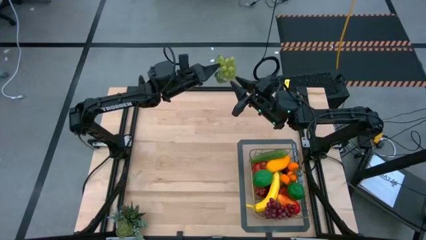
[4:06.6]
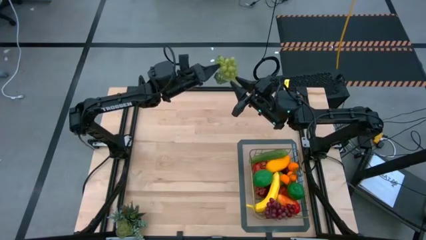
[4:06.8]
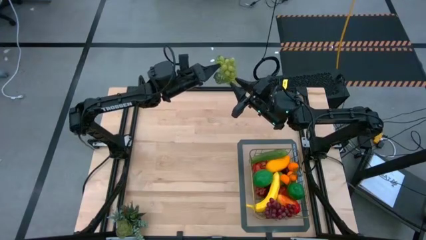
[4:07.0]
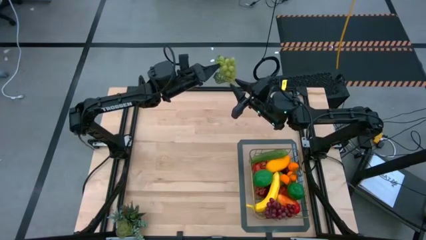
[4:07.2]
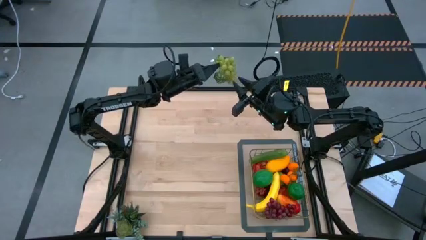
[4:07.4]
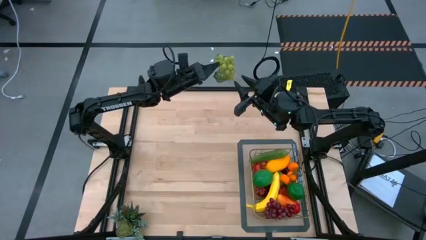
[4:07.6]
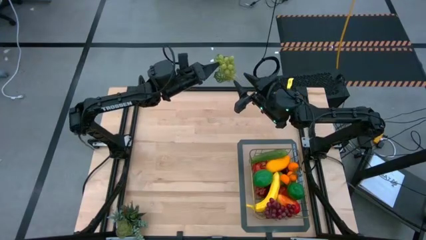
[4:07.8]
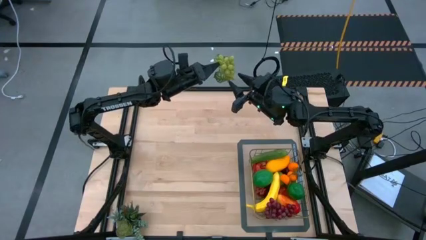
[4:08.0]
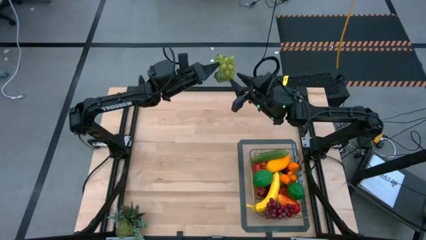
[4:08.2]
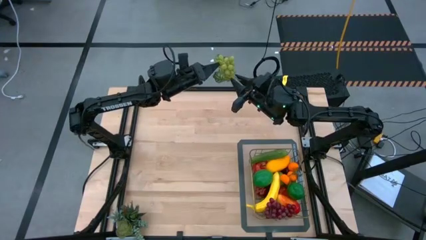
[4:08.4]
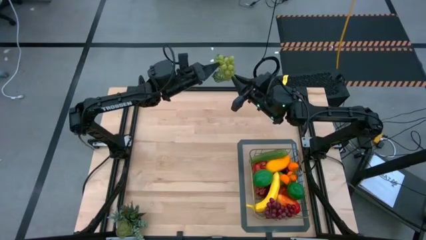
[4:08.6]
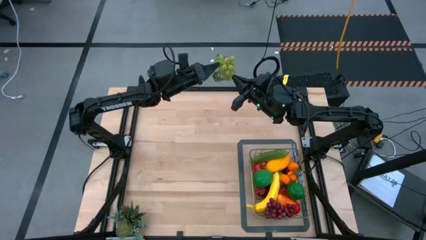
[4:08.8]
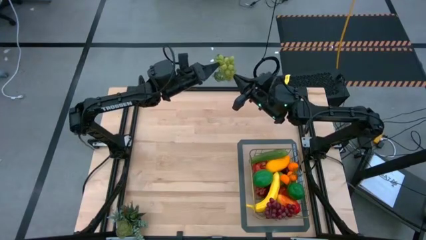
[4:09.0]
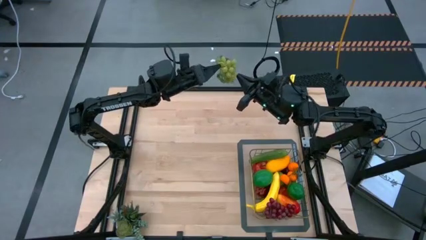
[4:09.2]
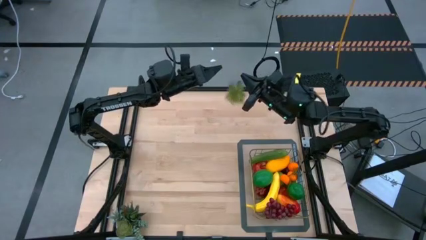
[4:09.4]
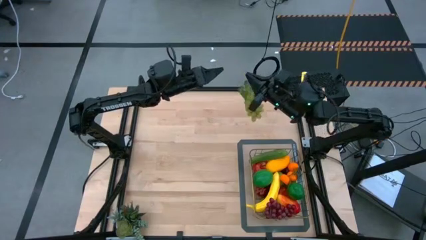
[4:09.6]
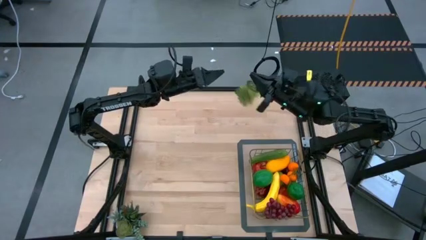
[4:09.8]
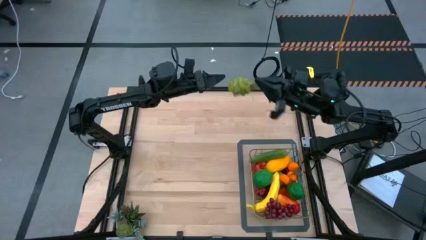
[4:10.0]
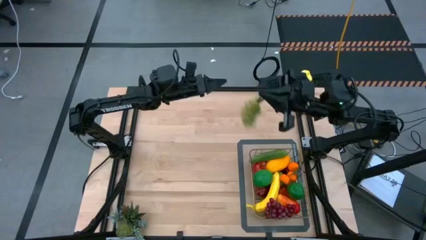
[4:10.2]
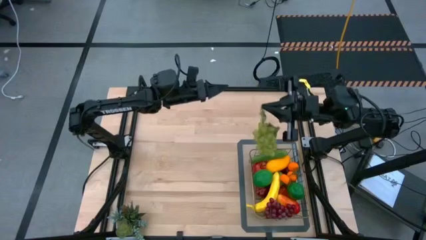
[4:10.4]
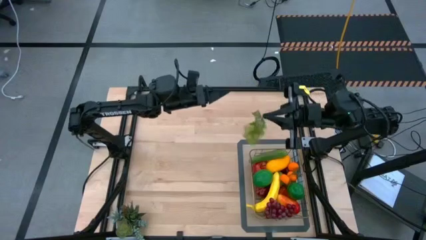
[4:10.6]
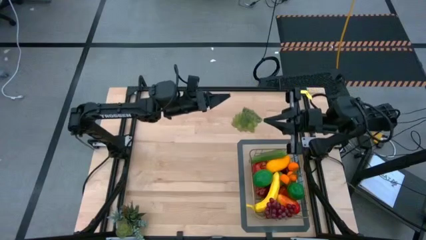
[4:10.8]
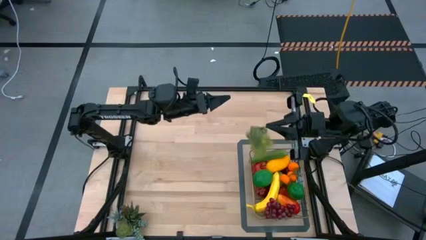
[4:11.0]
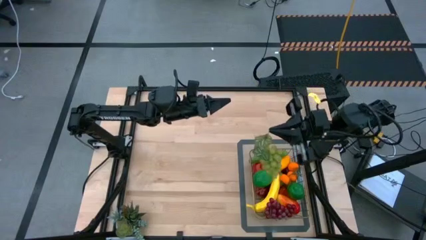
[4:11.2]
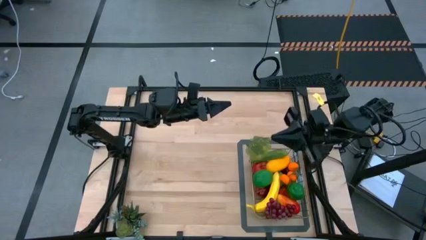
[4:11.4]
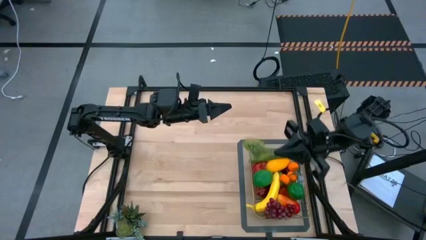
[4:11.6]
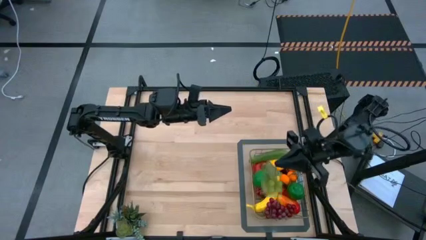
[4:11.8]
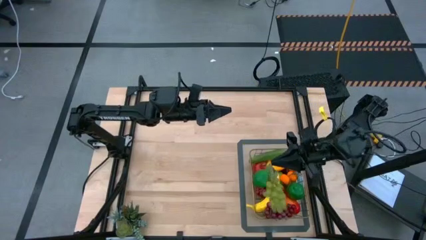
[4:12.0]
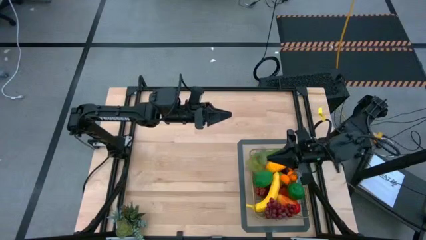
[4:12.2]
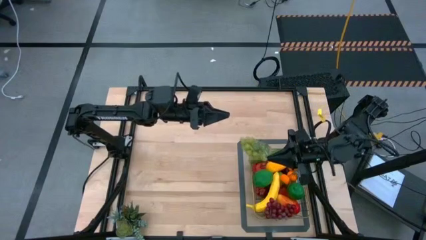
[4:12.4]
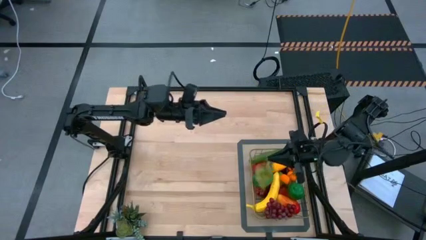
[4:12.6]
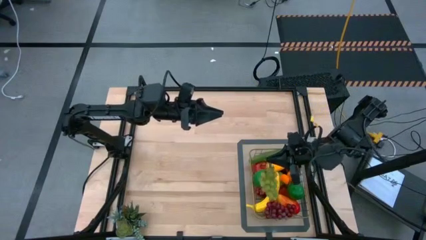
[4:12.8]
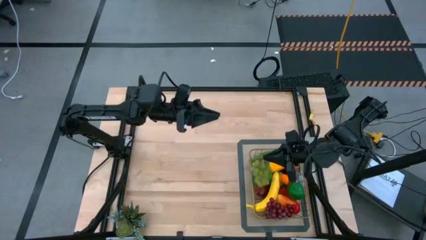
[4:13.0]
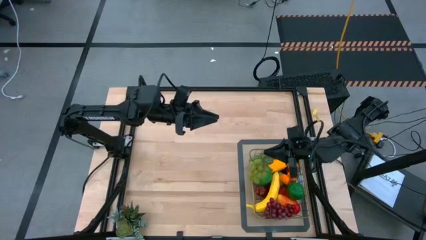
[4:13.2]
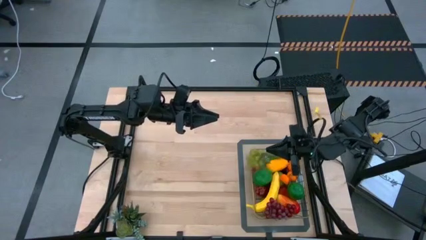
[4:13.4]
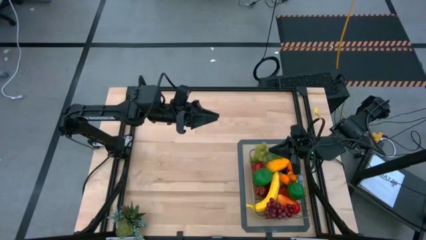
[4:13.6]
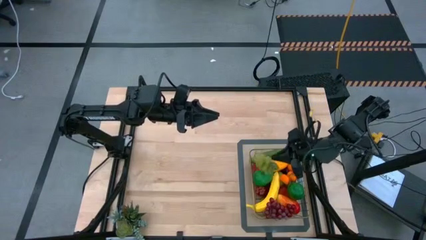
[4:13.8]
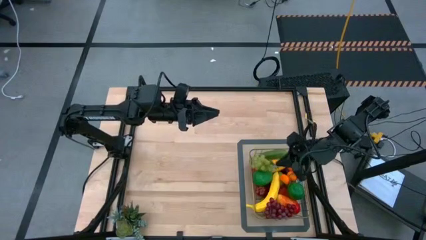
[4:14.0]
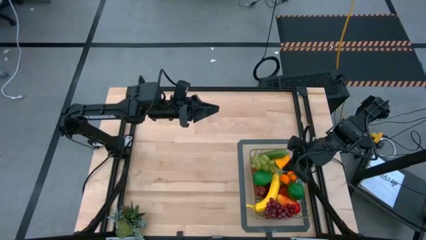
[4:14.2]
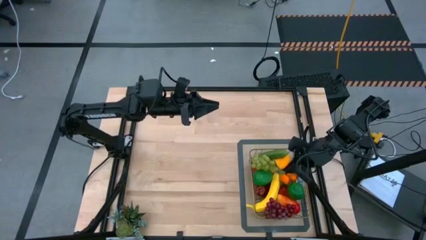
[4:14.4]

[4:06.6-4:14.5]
Task: Build produce basket
Put the green grapes into the wire basket

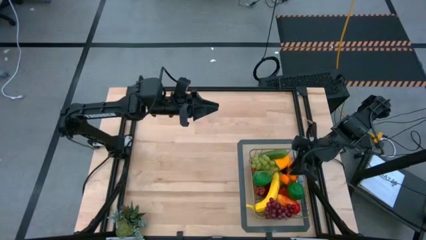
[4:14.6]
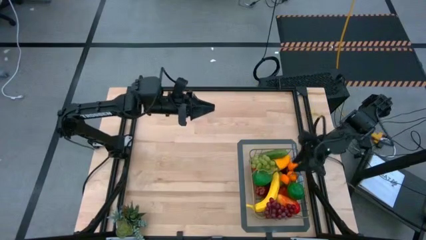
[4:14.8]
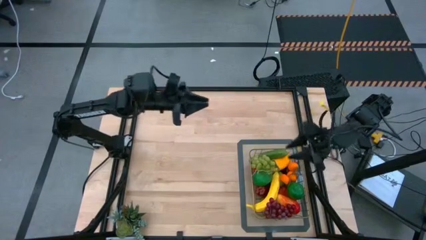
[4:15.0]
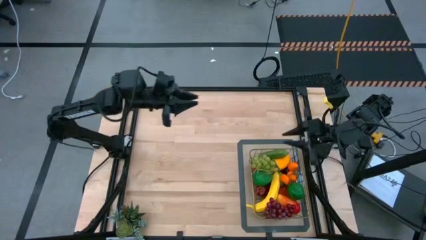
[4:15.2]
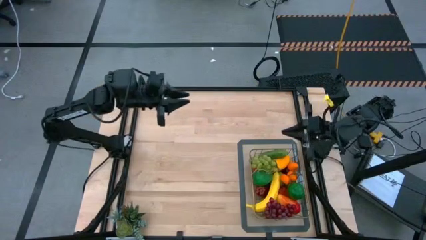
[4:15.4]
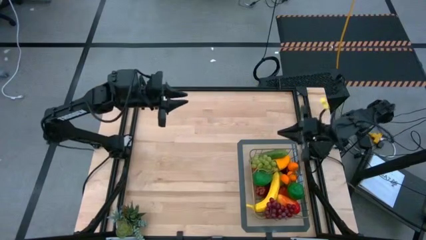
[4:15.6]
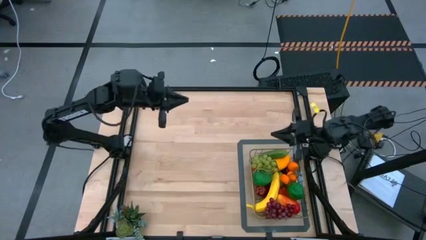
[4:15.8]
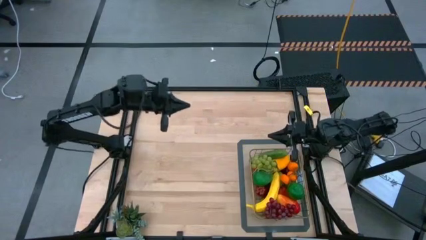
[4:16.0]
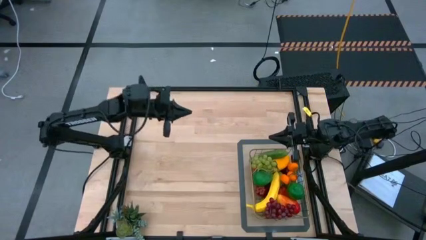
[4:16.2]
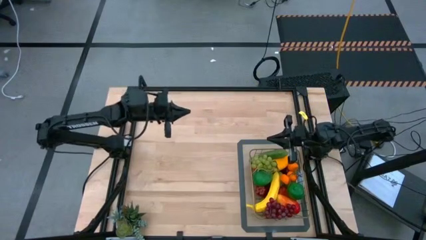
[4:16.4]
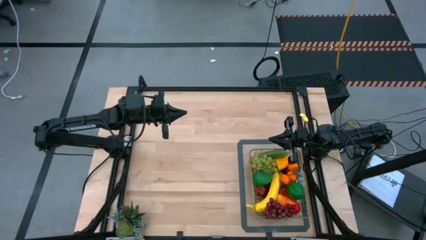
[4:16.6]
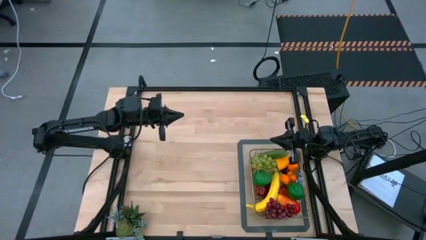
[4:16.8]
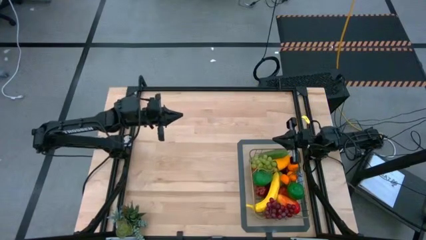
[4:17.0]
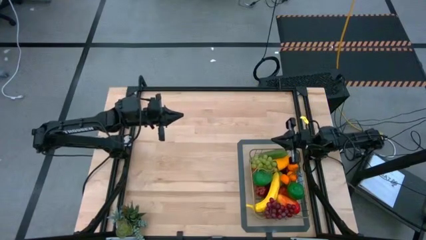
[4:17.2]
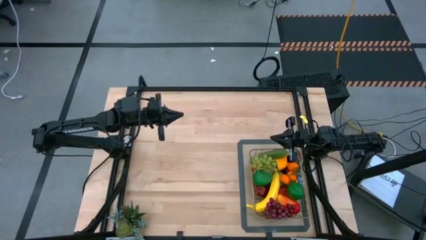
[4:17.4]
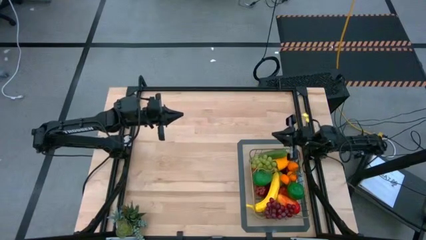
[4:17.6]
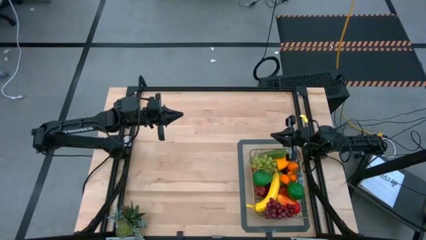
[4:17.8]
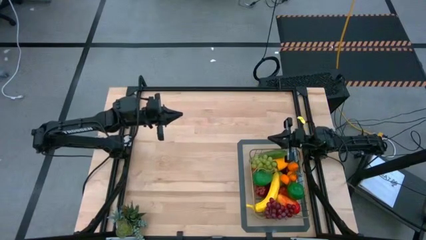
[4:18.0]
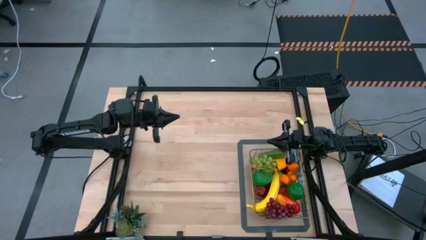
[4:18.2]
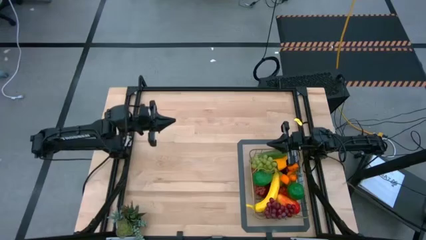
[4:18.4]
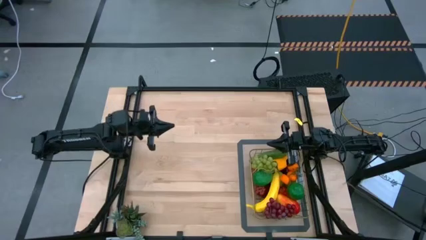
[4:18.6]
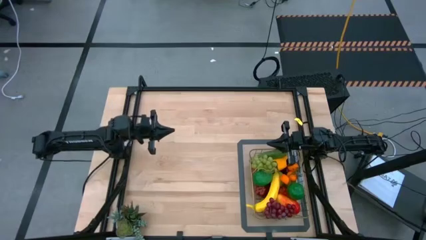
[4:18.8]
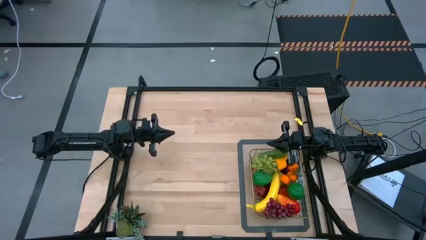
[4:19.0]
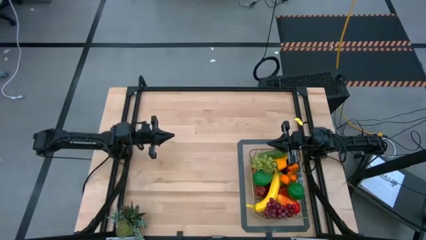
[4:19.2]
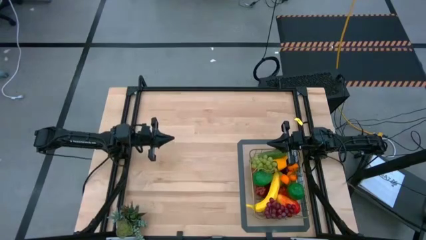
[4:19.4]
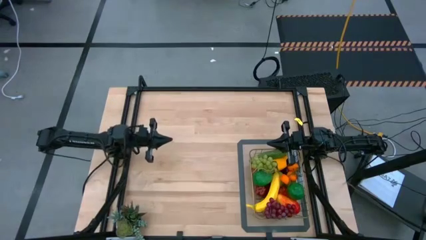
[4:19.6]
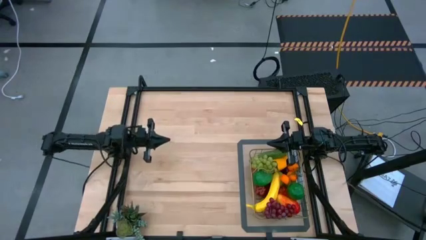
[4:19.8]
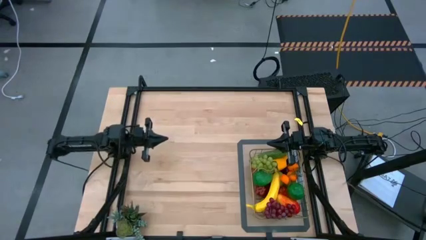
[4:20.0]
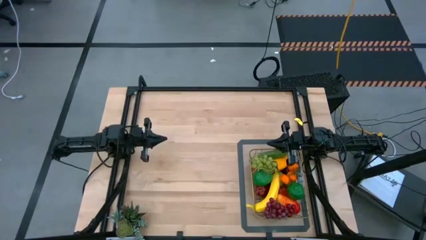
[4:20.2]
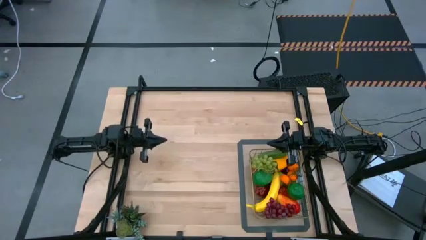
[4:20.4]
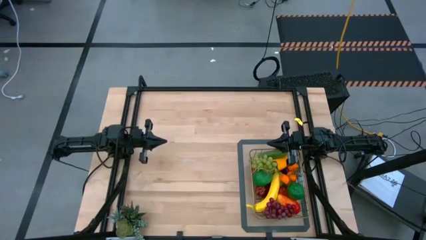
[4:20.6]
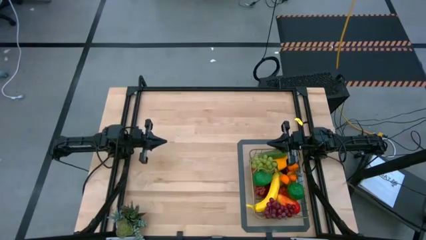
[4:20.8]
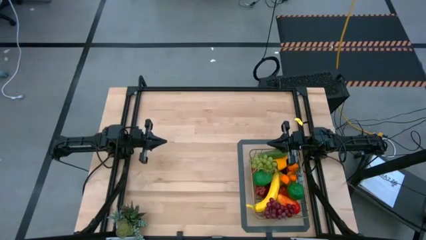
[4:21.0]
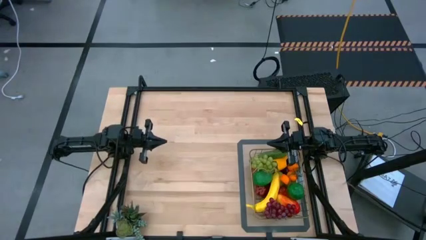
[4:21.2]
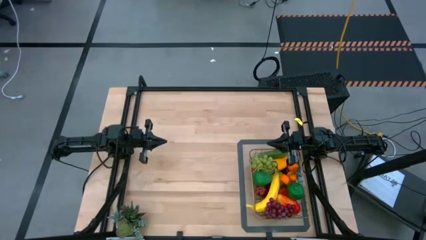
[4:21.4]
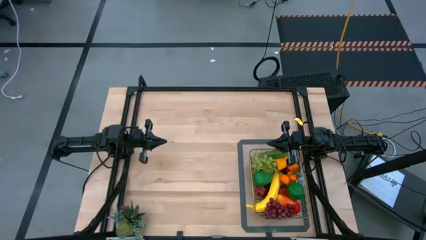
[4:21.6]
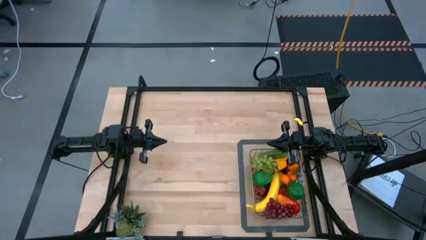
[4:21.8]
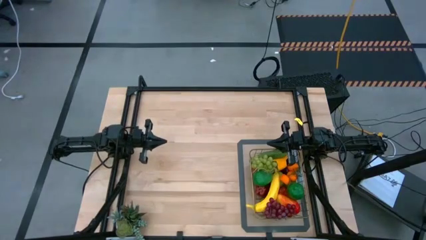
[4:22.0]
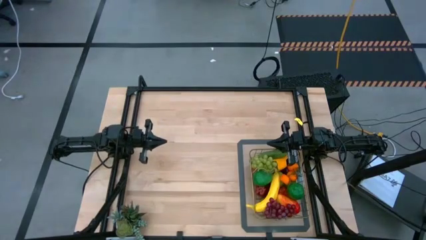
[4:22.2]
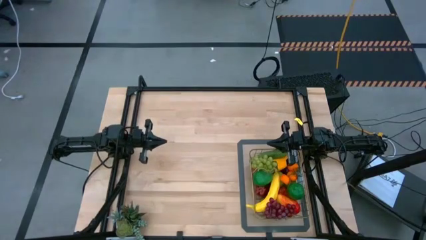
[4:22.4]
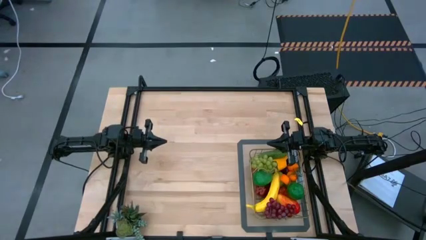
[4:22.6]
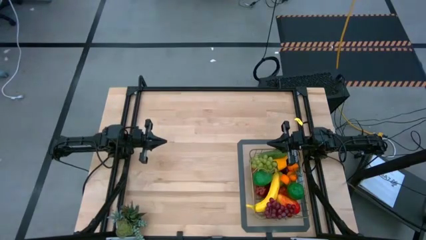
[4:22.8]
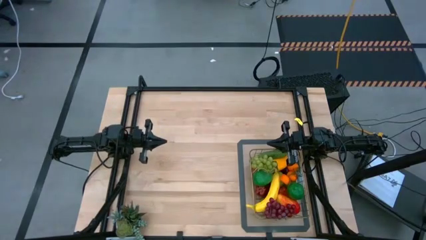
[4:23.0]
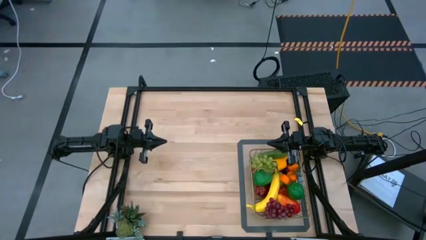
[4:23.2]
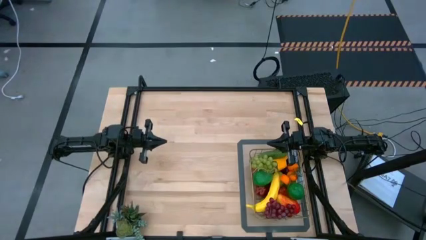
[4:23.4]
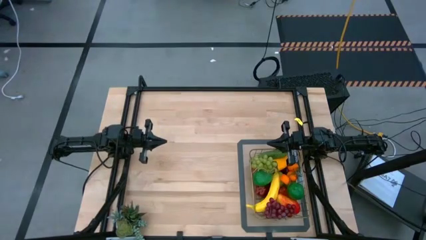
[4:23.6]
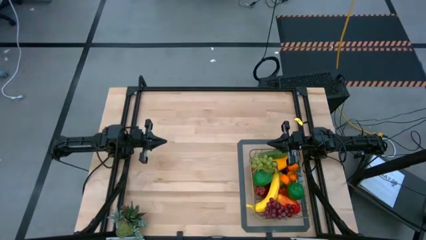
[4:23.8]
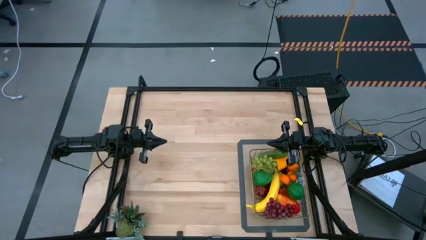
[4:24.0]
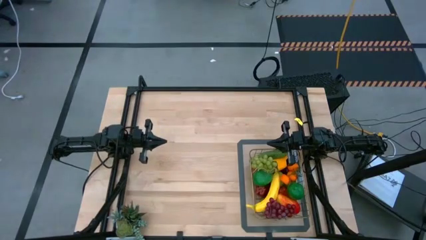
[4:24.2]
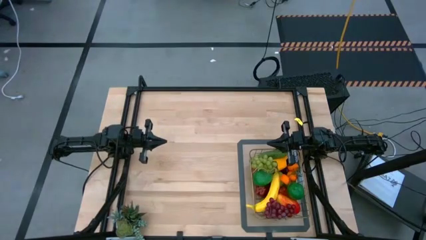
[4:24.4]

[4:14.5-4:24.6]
Return to Home Position
